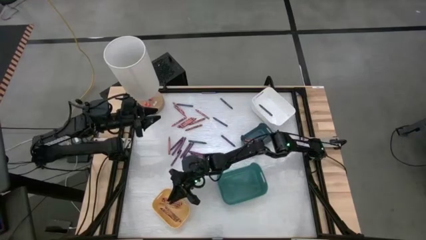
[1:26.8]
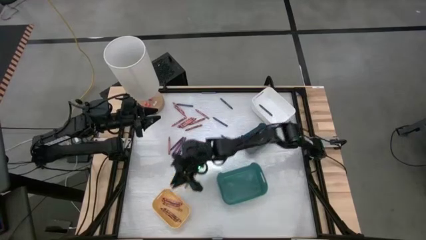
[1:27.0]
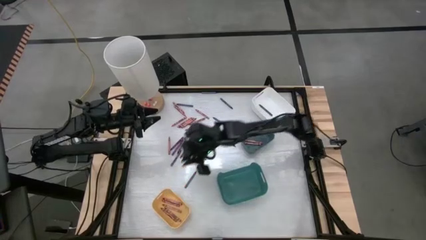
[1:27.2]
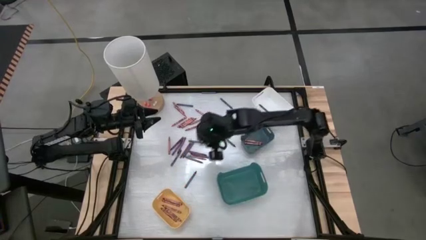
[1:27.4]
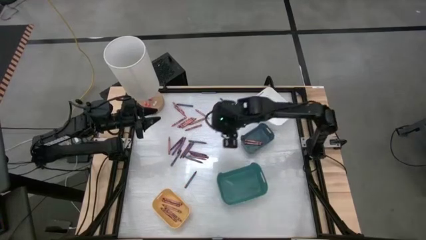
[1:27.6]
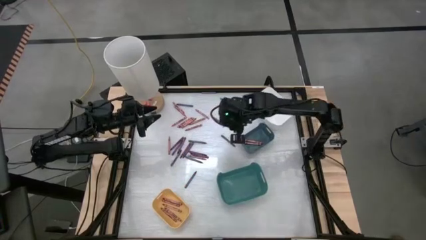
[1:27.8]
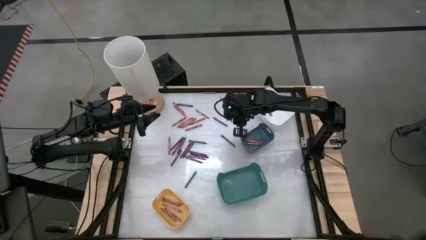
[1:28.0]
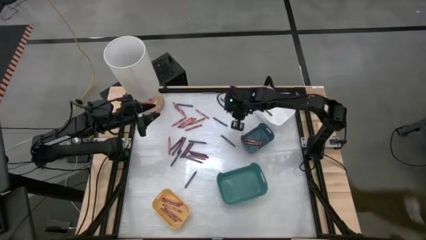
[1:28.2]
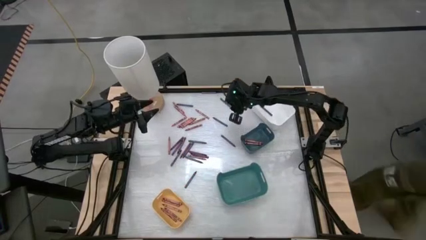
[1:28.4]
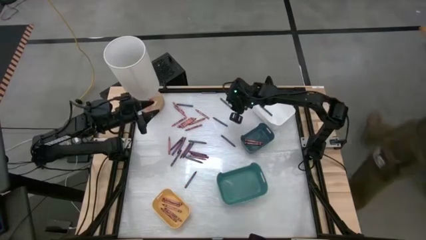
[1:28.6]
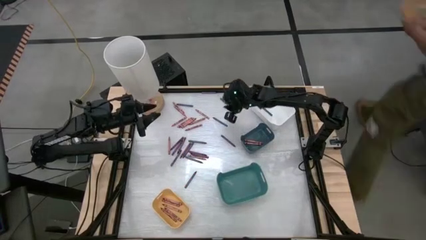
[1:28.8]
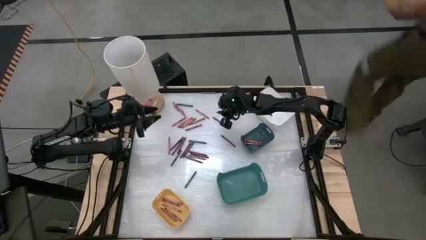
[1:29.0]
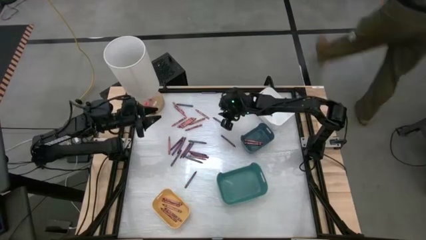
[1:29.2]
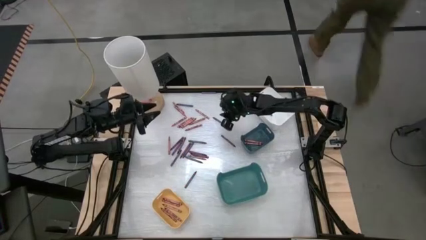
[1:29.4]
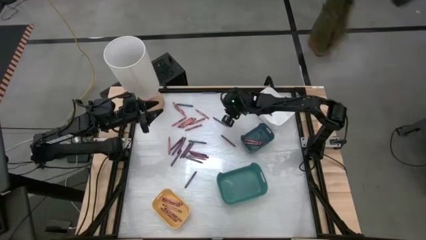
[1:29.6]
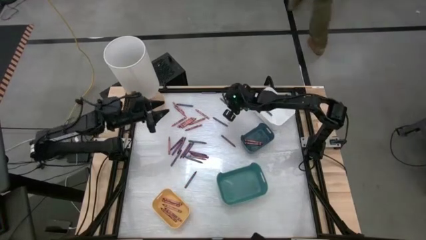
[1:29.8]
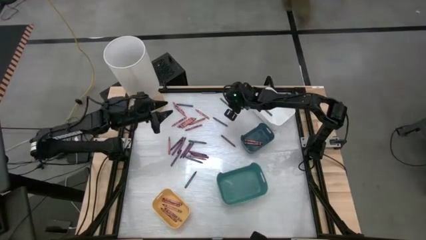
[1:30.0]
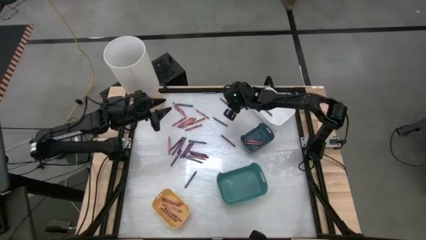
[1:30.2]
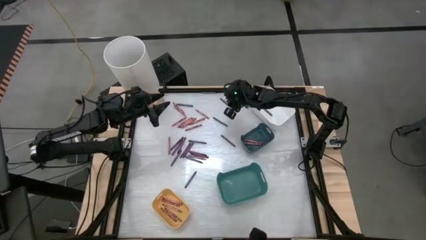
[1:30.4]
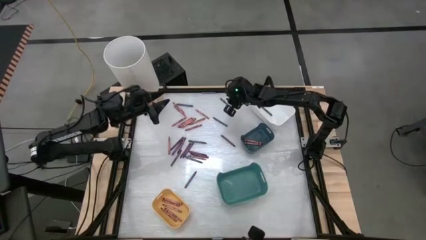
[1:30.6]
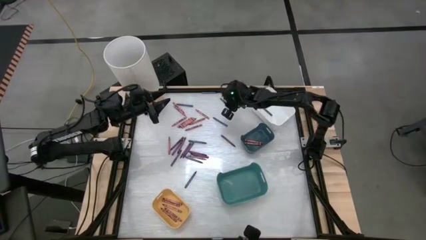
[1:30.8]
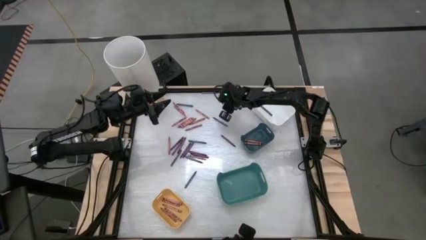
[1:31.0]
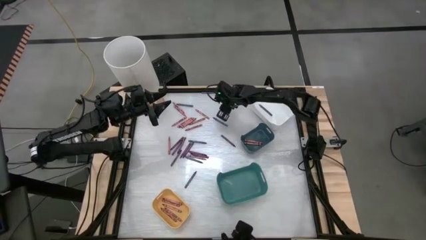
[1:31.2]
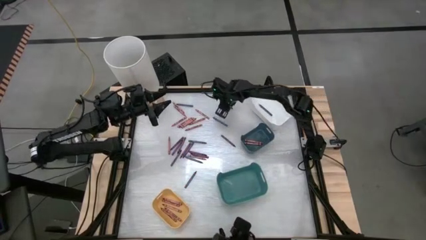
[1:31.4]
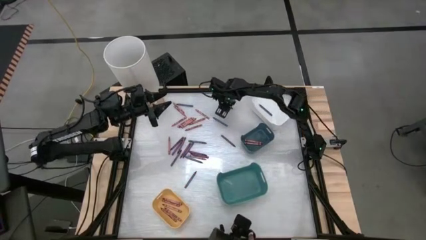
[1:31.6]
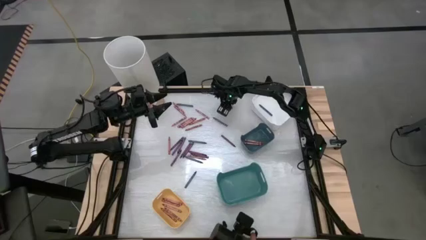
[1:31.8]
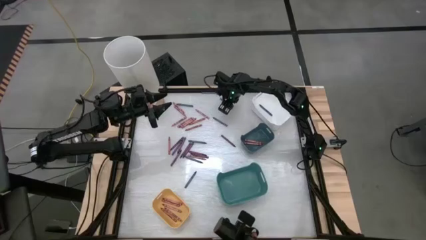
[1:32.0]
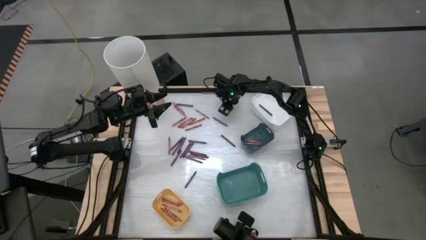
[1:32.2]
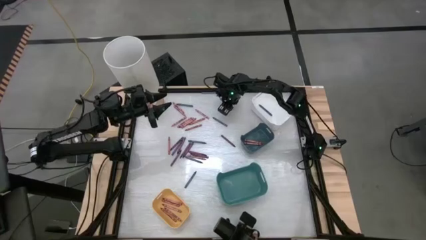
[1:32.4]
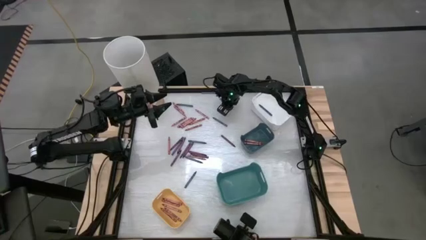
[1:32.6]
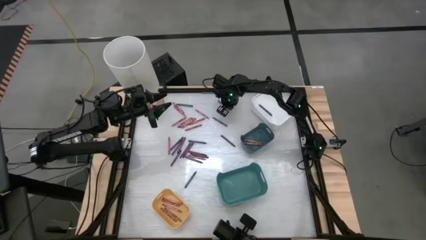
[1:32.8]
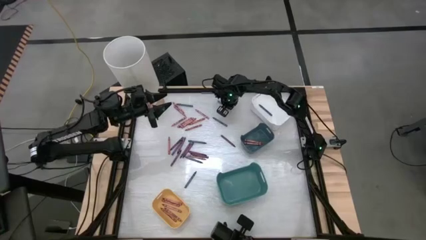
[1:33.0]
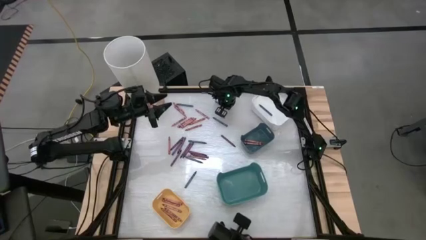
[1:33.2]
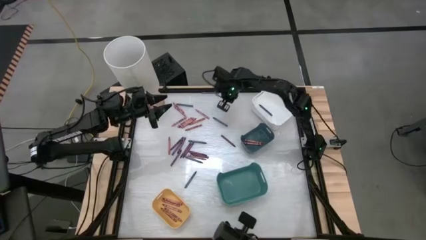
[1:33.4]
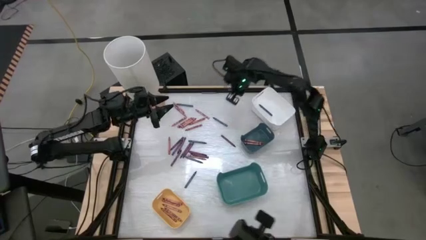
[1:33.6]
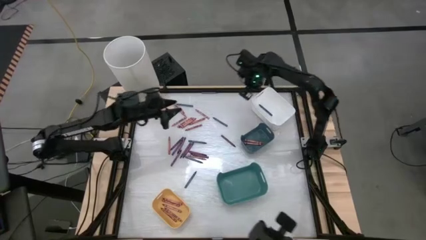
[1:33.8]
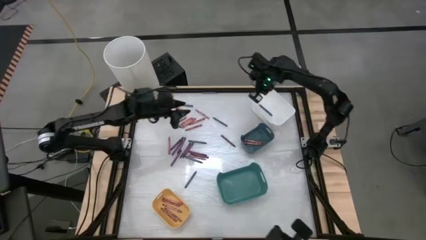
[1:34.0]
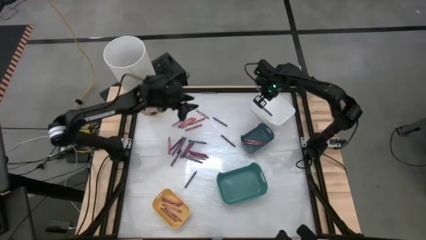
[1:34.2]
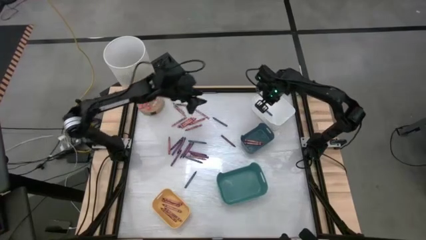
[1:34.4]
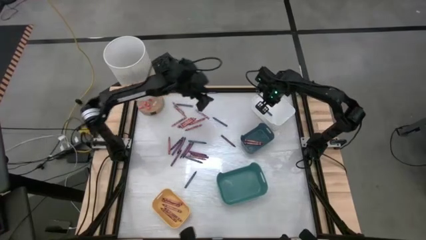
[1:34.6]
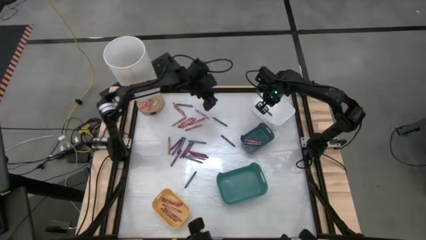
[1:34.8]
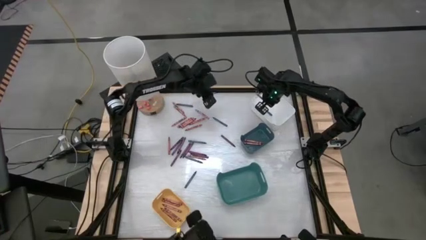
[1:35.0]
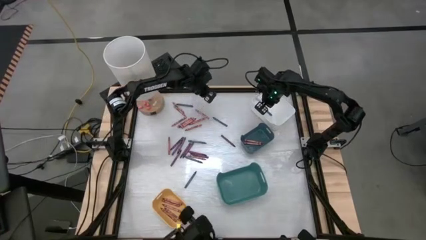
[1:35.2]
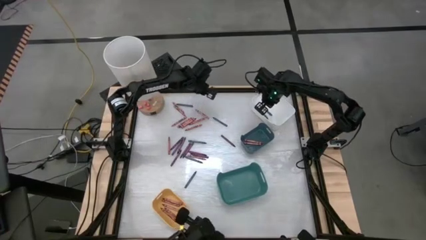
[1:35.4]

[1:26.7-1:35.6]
Task: Sort crayons
Put the blue crayon into the white bin

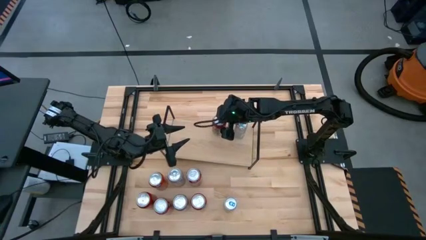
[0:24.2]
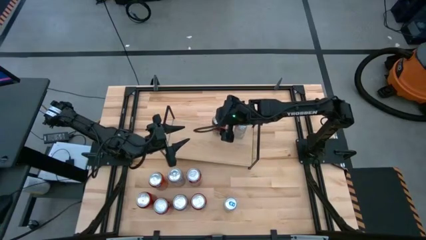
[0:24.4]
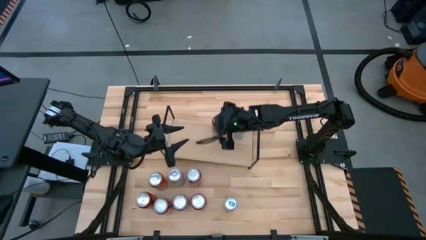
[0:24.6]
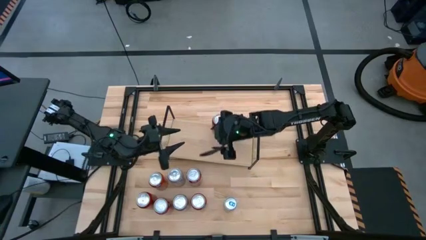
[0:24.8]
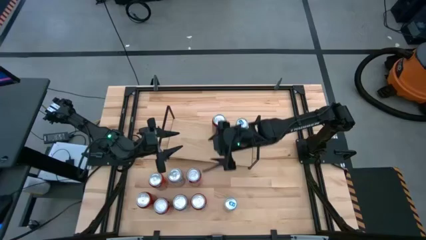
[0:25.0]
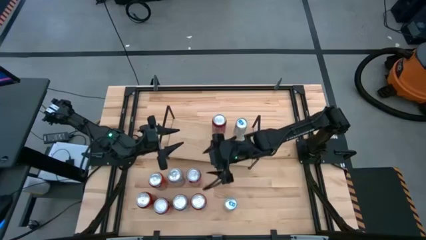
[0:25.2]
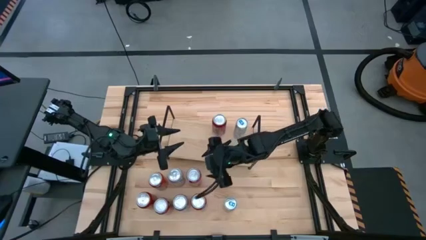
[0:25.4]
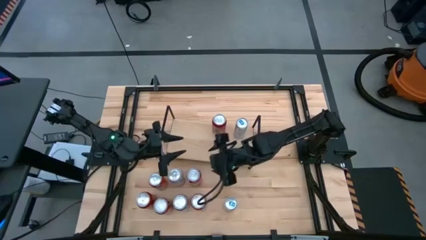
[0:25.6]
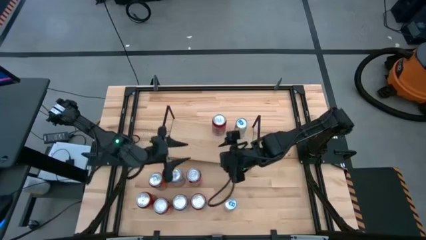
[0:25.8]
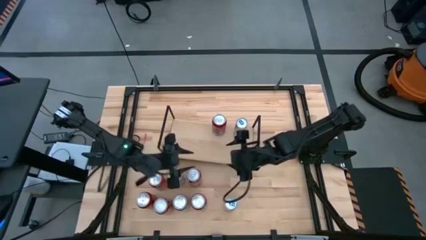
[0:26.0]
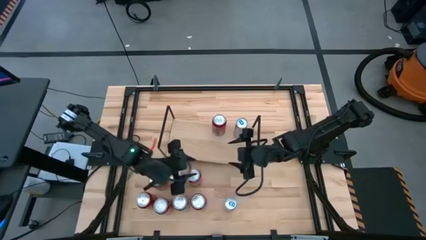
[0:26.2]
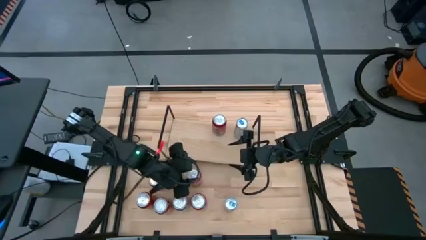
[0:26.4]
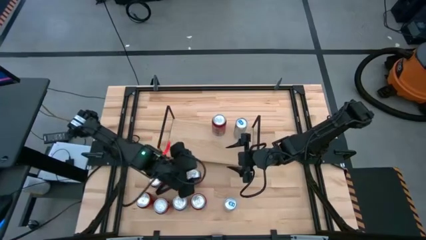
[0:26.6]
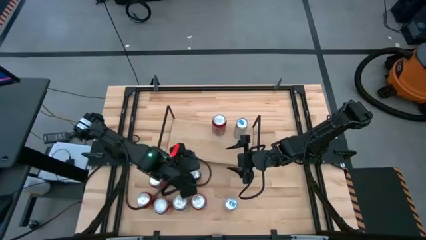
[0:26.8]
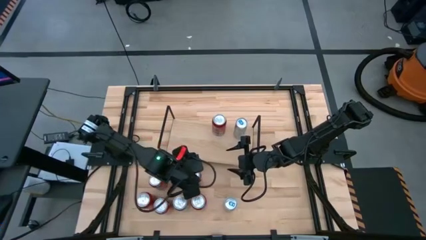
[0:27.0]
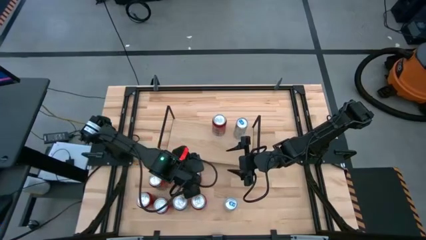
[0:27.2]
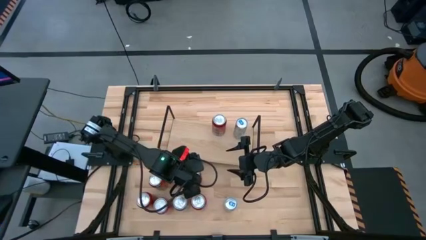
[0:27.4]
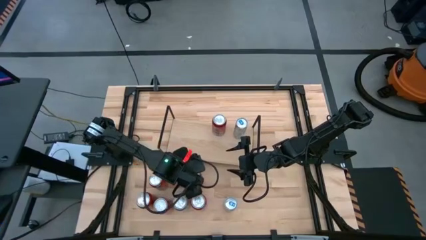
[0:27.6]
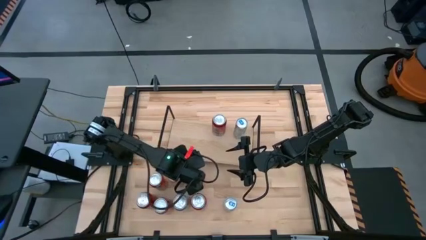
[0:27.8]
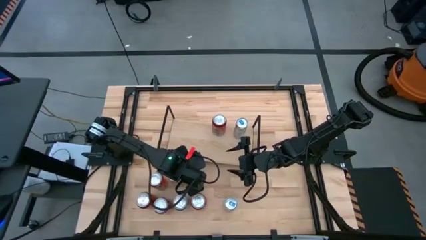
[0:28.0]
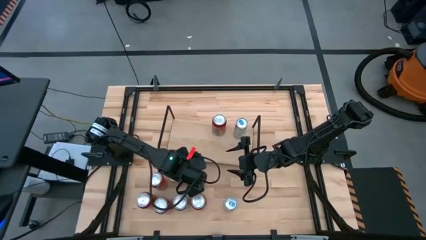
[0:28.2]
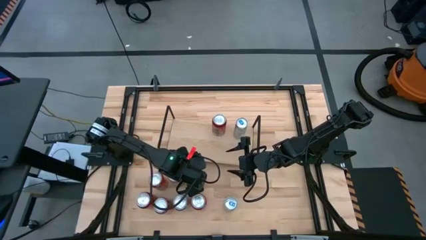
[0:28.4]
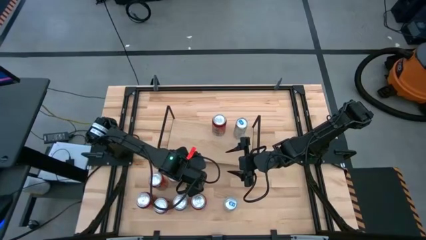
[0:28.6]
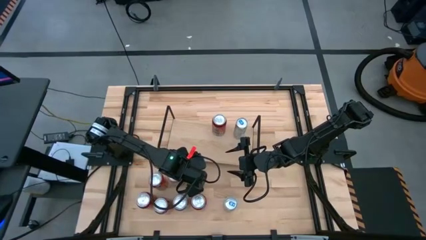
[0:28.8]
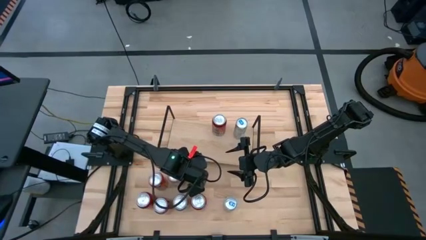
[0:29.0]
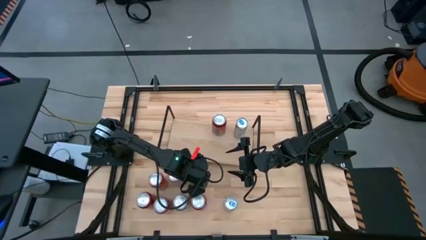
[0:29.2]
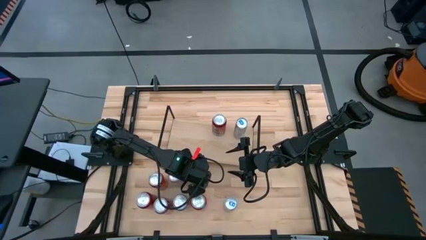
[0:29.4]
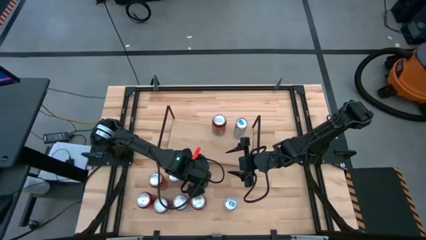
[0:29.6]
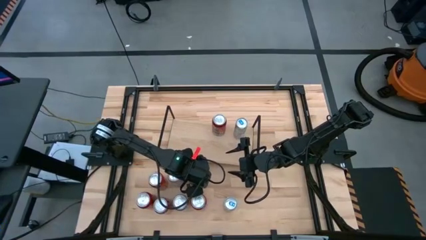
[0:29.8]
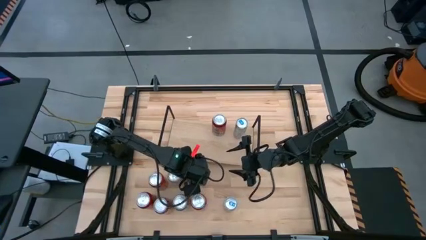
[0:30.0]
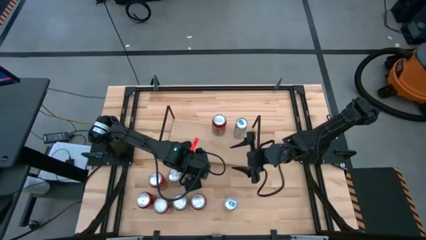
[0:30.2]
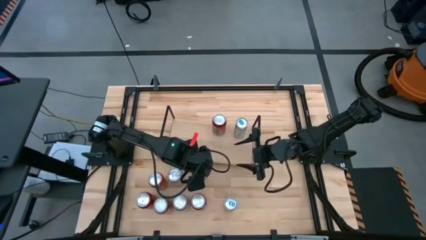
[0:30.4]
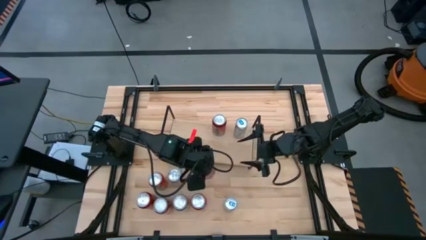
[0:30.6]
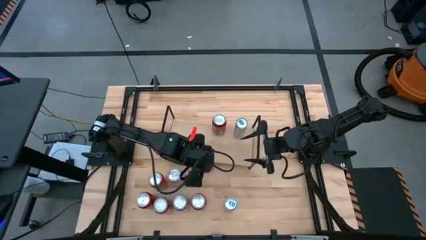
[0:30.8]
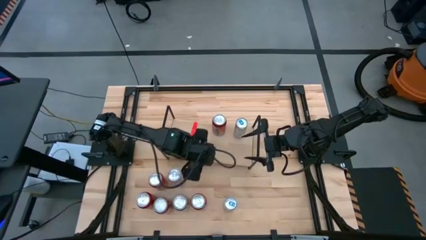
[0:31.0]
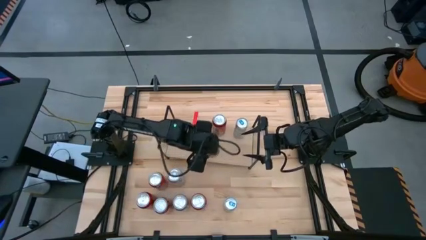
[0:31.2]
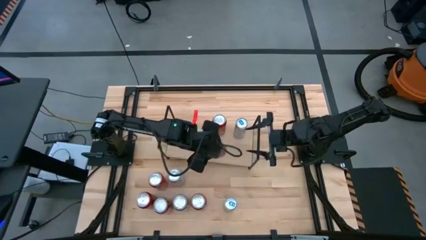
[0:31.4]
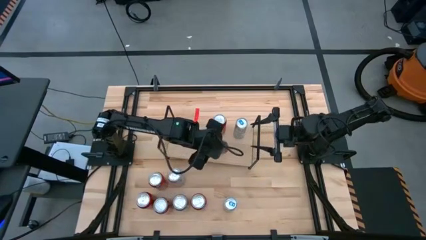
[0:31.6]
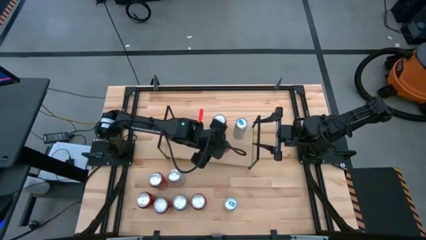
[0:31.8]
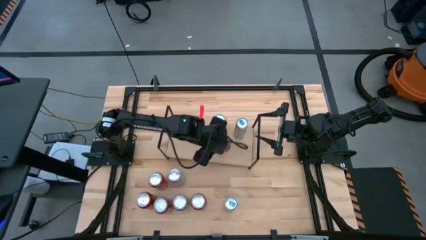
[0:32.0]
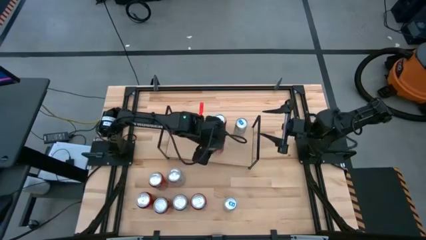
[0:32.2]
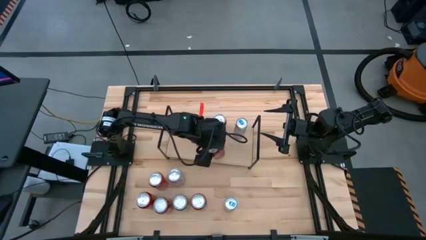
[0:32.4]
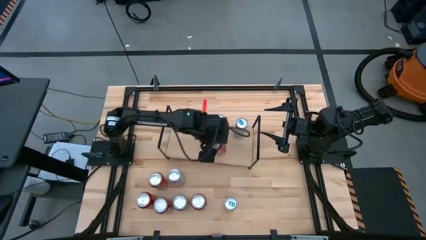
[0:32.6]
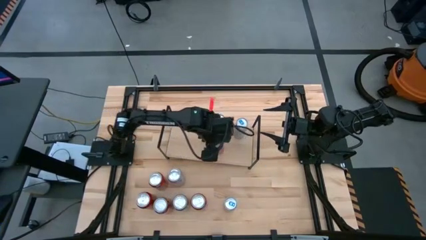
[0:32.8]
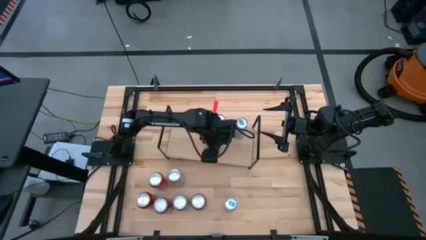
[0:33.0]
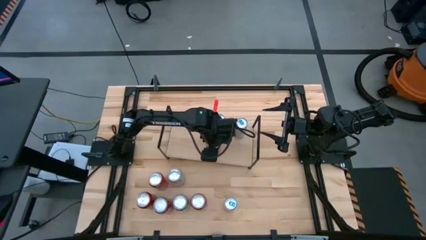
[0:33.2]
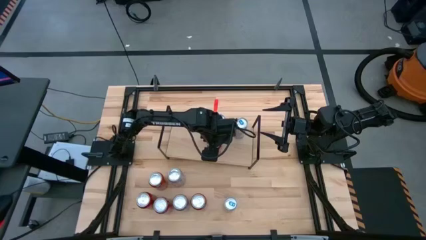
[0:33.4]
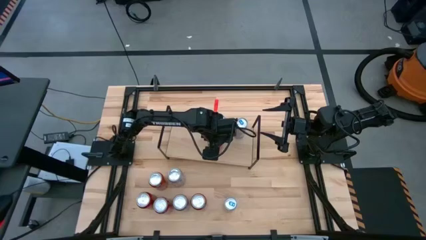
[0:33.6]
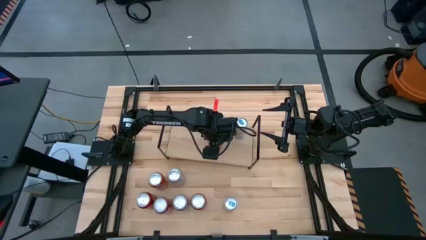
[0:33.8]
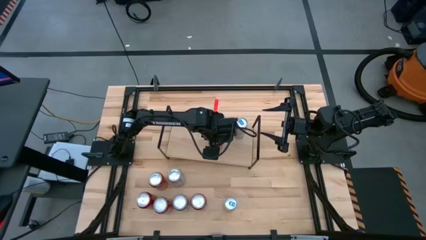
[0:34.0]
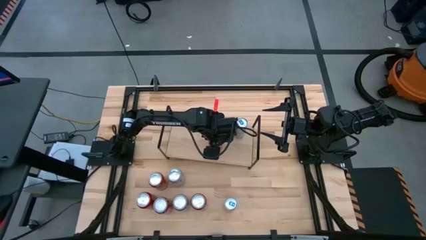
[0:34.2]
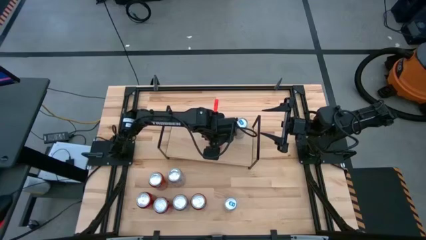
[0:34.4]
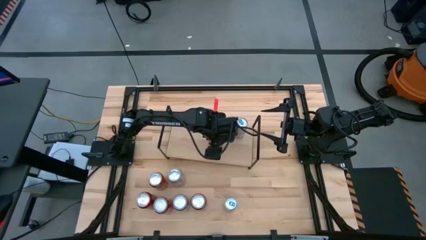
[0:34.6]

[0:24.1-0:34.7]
Task: Place canned beverage on shelf
Put the top red-white soda can on the shelf aligned with the red-black soda can
